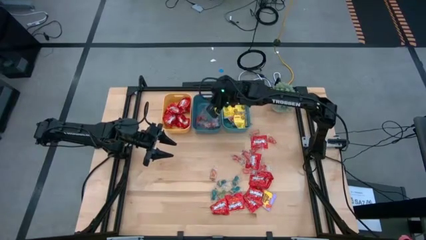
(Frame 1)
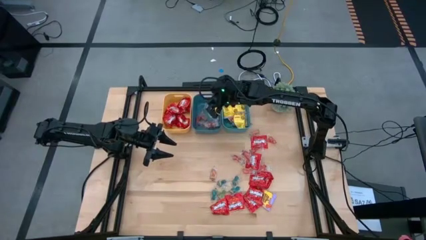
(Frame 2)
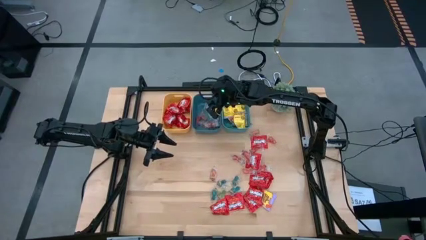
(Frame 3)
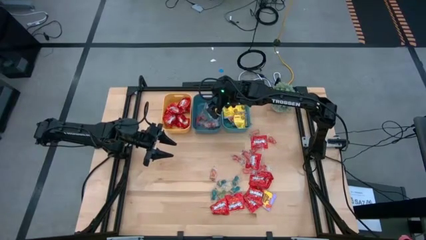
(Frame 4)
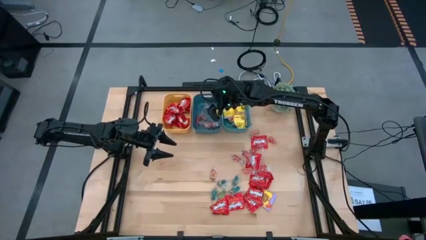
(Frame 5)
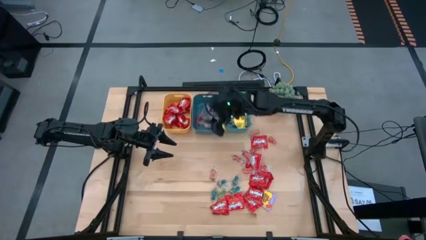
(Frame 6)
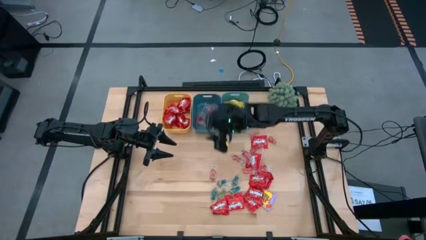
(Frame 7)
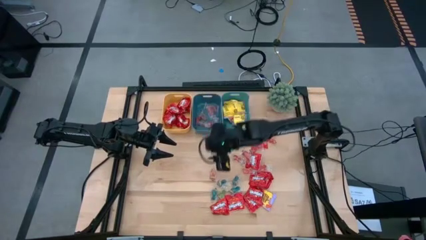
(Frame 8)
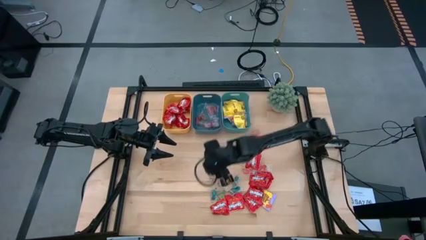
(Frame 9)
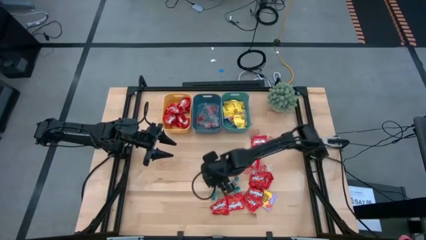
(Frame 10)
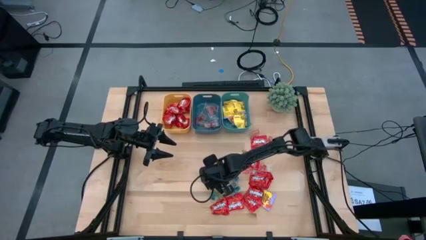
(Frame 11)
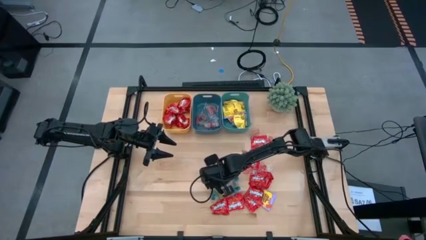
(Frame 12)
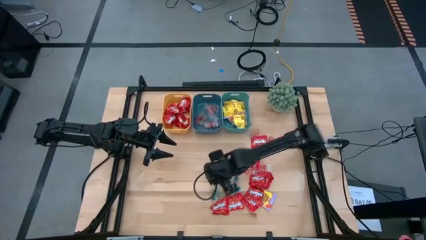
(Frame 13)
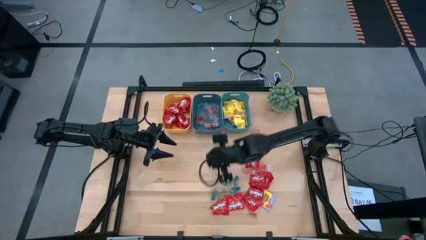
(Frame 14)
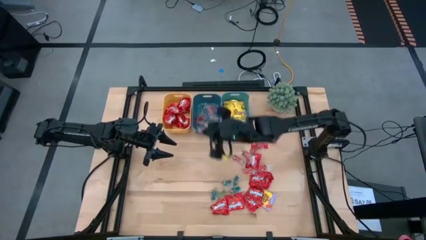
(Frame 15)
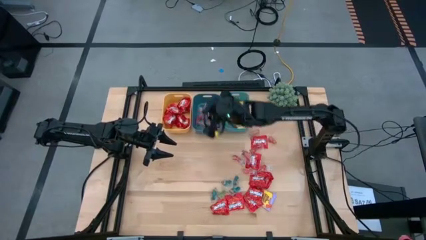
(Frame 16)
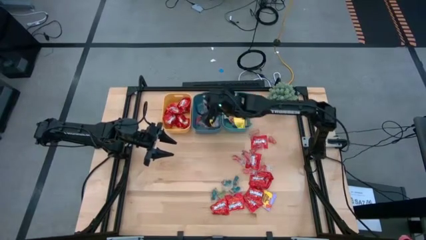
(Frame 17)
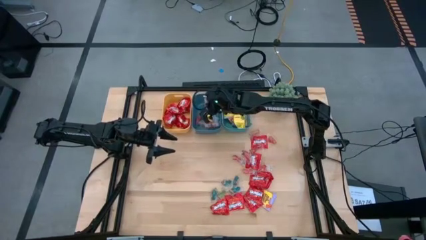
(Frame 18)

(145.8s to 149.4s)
Task: Sort candy
Put the transparent orange gummy into the blue bin

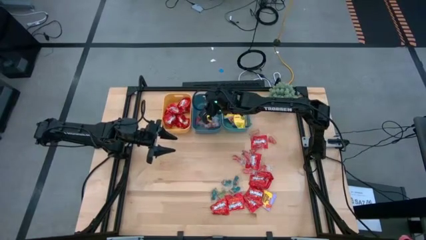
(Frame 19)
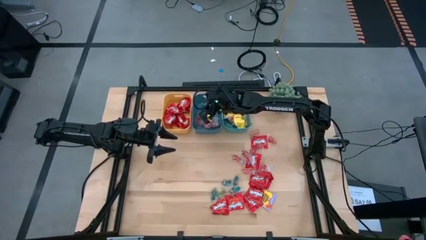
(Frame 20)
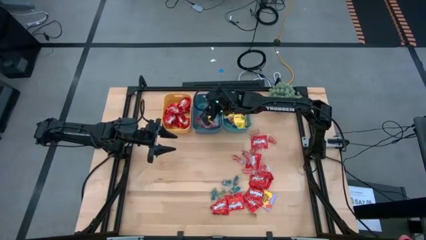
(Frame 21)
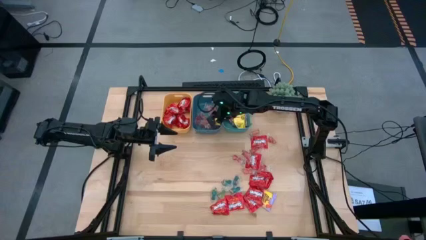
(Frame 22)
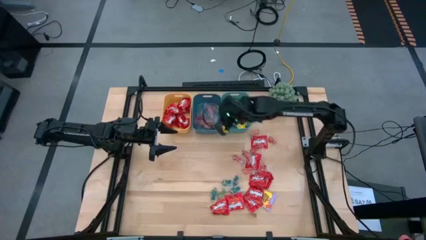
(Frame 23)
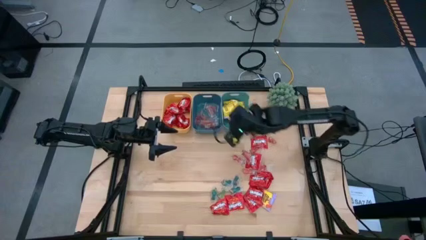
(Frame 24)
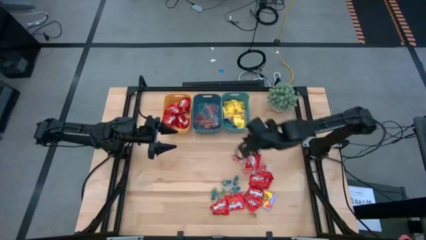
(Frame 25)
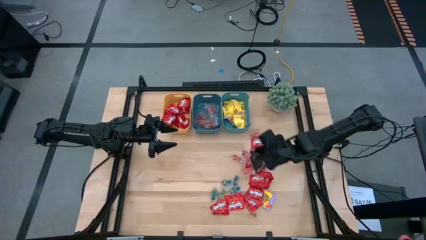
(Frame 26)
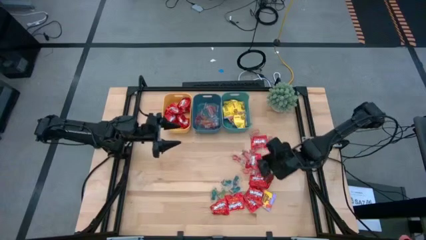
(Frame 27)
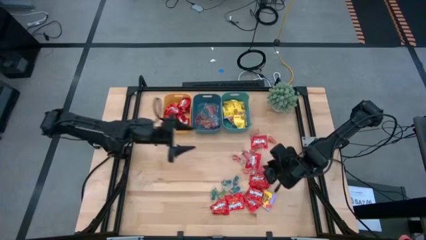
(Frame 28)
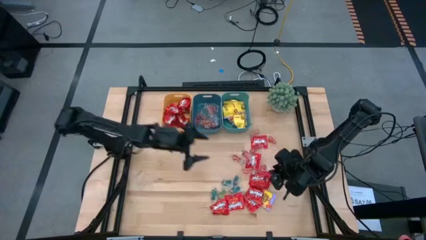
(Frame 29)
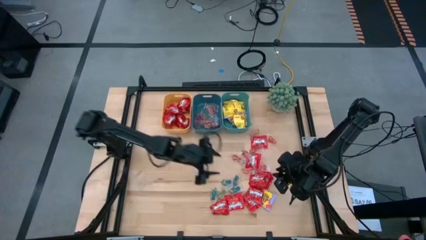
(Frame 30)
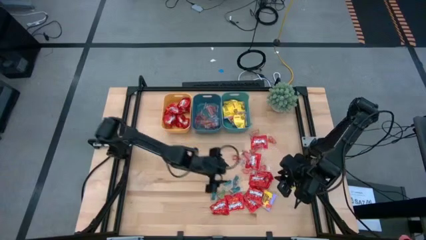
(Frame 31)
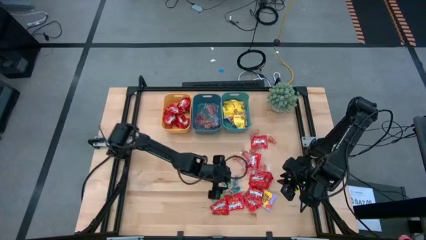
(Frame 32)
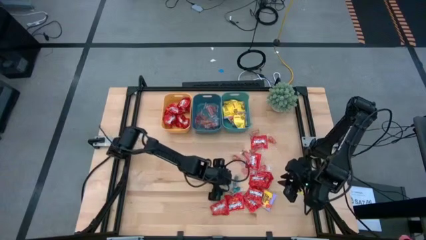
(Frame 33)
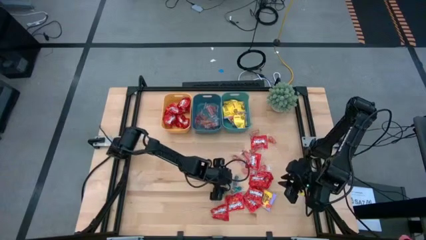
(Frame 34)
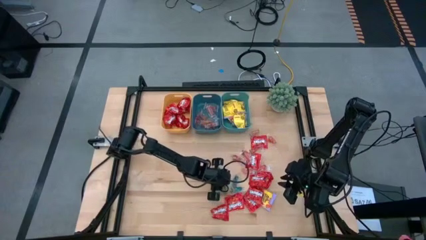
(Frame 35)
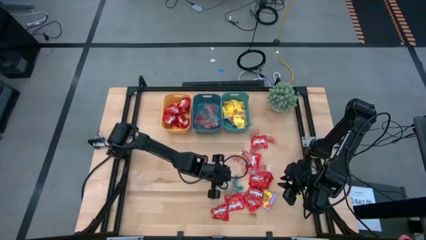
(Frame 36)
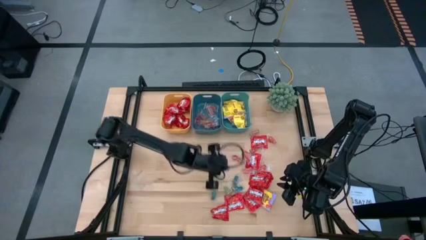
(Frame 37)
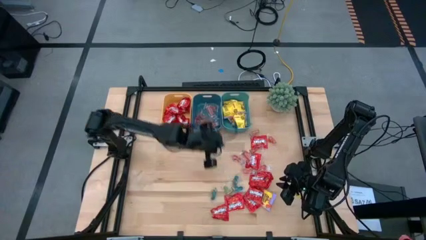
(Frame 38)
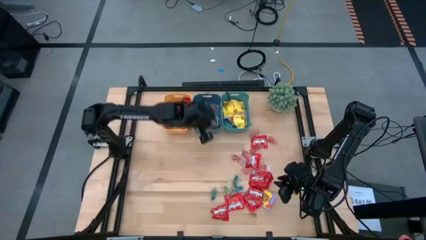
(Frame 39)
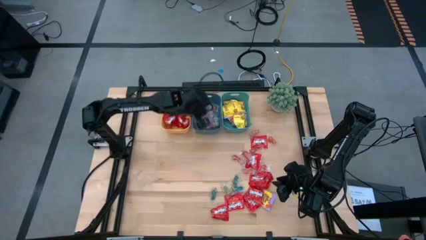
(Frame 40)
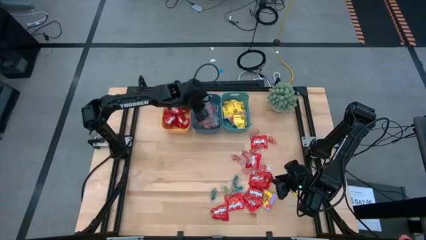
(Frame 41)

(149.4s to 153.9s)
Put the transparent blue candy into the blue bin

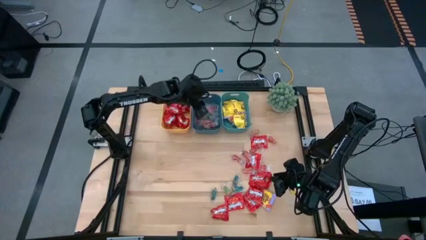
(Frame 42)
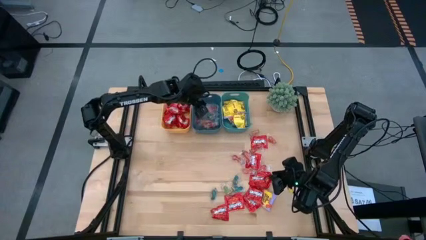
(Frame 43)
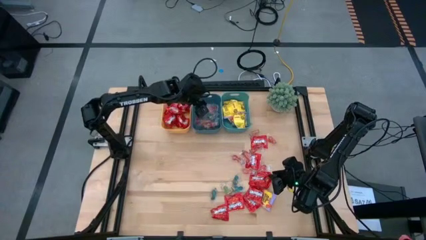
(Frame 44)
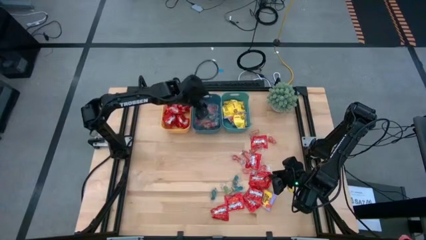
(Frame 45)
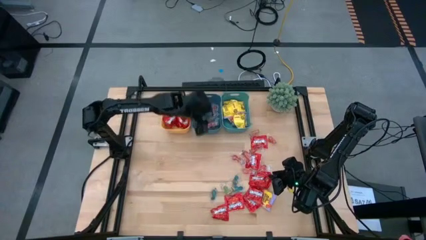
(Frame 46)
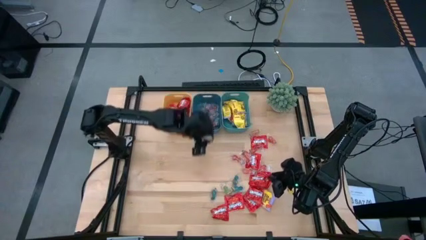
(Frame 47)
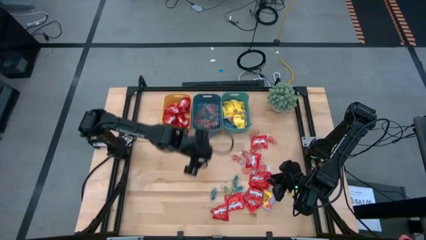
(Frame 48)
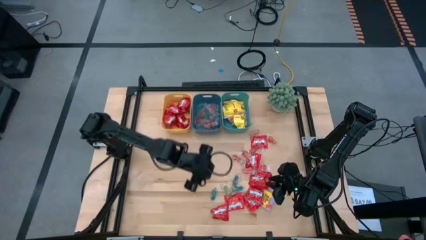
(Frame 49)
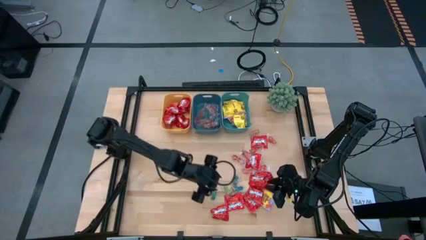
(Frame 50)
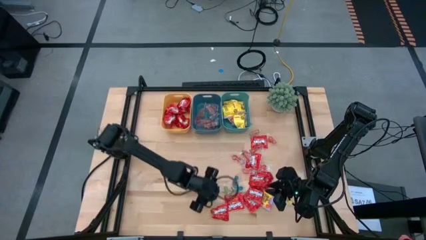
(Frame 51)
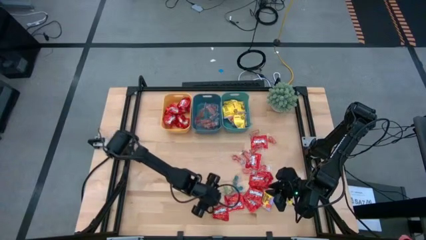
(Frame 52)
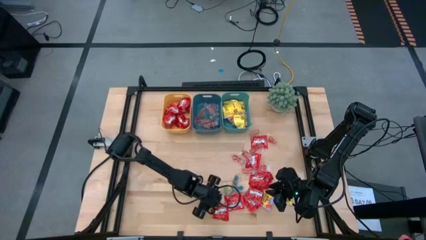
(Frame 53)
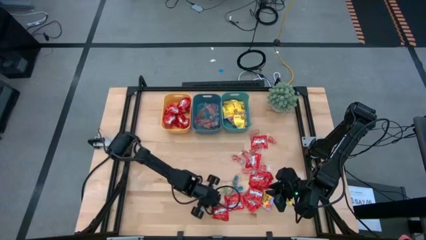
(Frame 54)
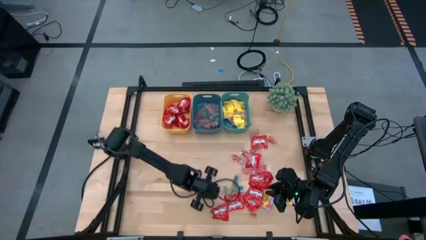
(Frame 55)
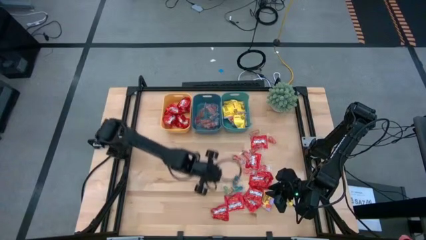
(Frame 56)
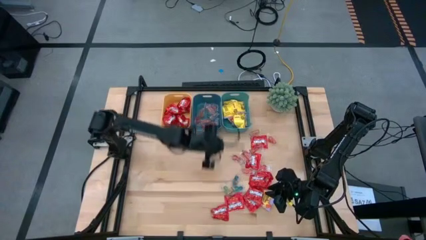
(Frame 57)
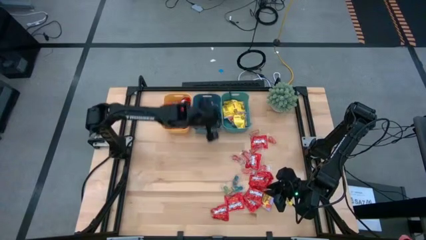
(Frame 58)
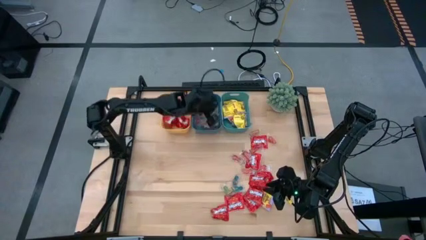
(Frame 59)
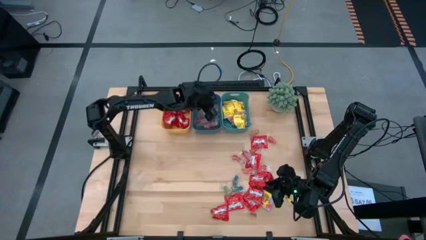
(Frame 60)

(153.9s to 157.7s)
Put the transparent blue gummy into the blue bin

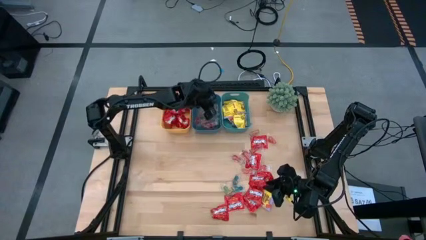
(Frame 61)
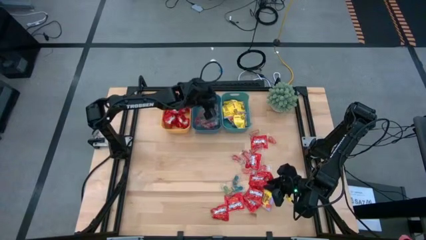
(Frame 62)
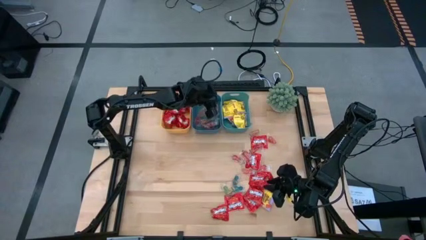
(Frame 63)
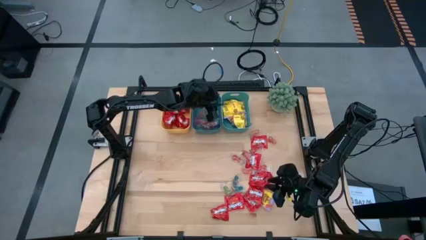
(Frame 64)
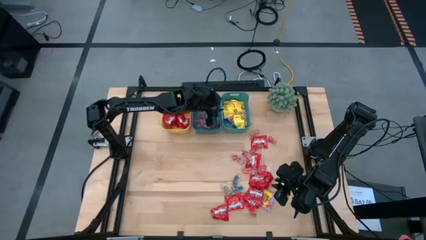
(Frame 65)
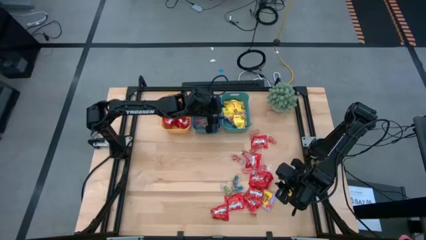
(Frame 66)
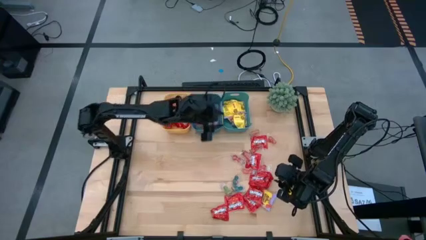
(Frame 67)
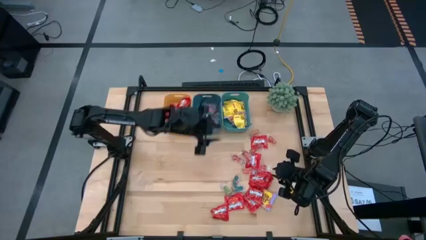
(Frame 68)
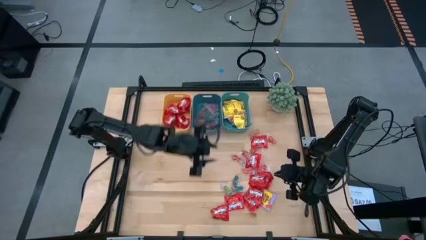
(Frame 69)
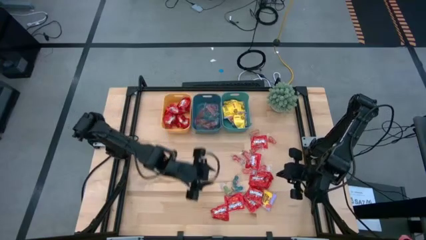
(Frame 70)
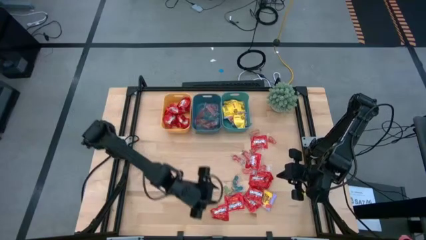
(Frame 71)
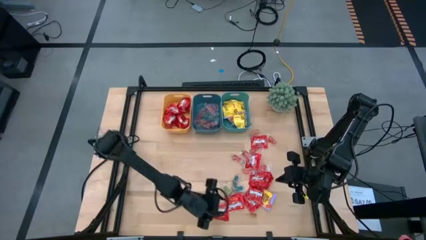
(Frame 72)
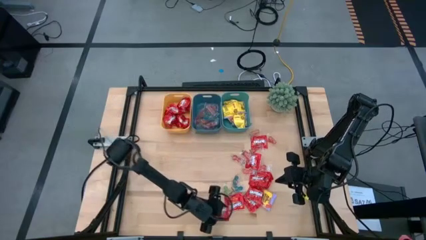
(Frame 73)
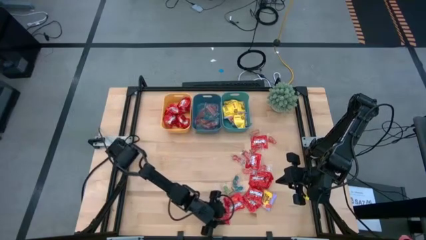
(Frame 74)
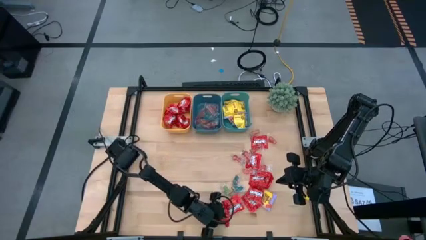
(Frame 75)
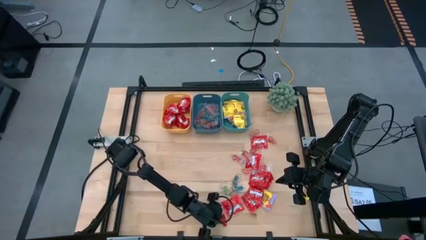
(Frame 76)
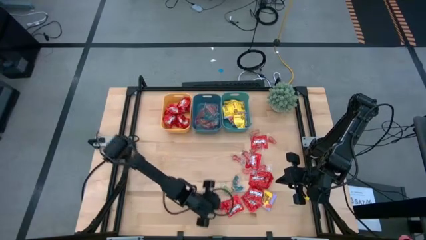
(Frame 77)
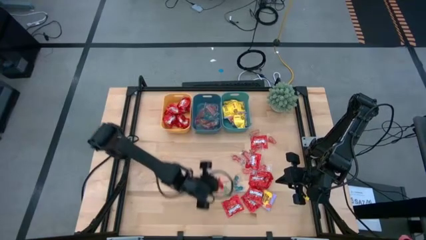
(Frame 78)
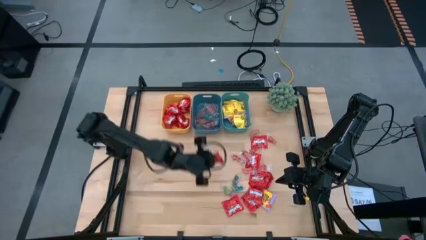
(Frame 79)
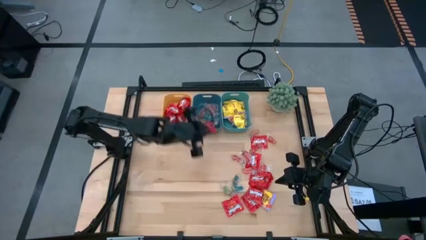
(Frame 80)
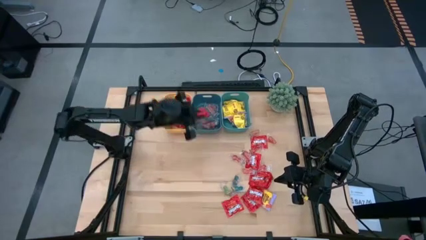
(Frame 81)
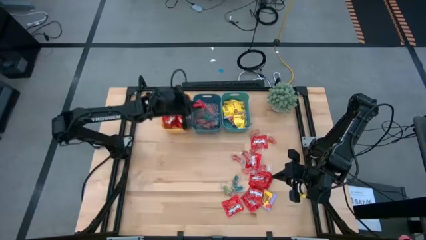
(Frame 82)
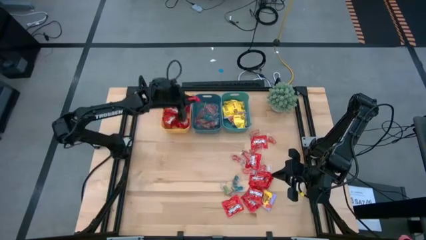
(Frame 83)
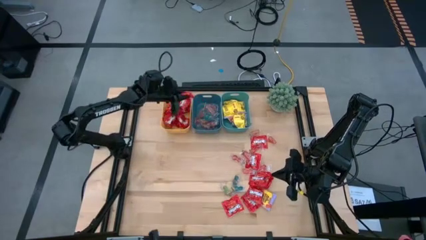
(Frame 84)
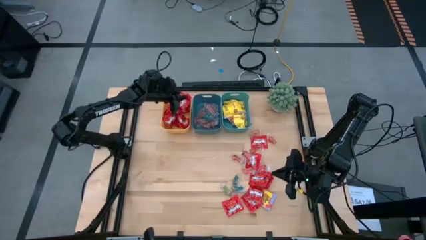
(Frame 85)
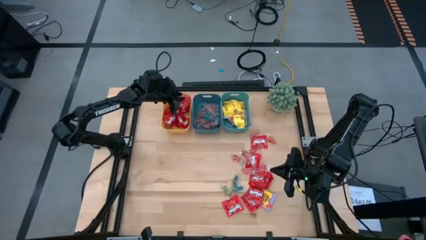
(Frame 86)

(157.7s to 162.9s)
Put the red candy into the yellow bin
